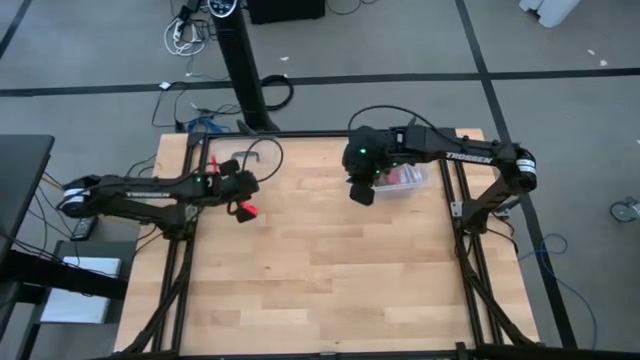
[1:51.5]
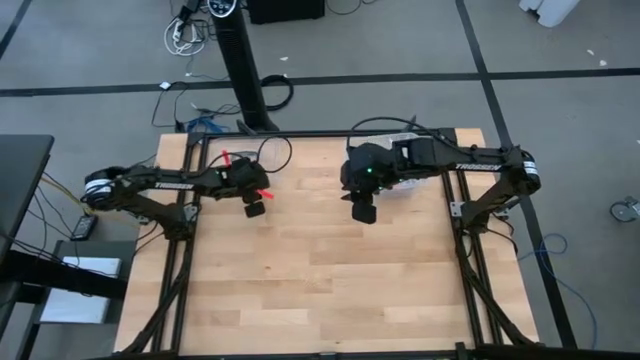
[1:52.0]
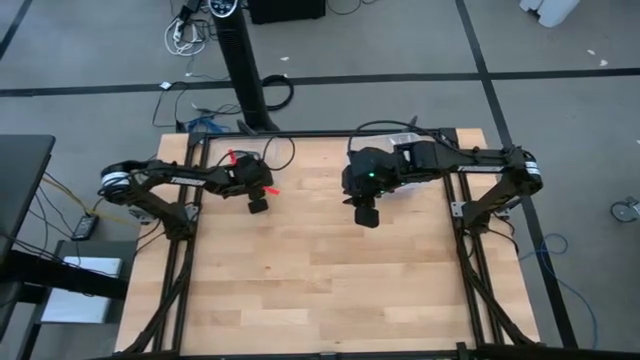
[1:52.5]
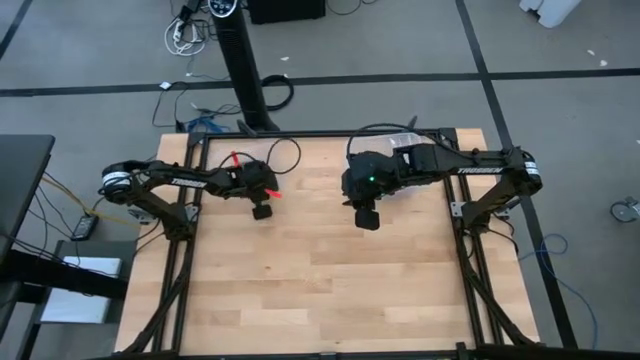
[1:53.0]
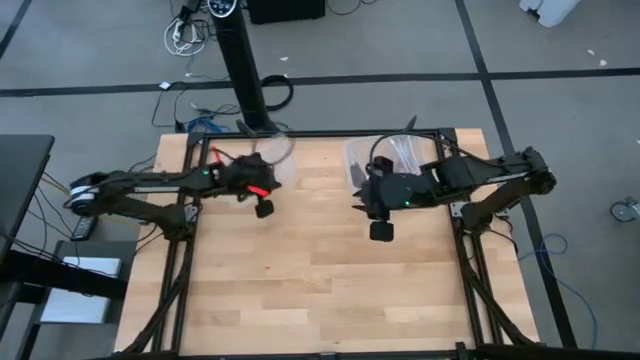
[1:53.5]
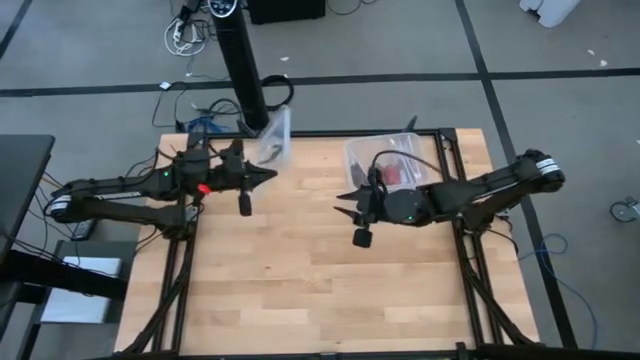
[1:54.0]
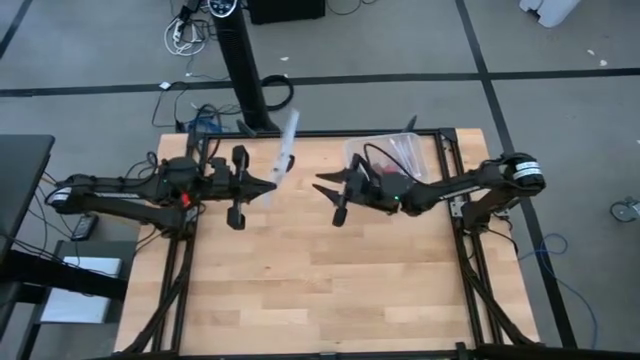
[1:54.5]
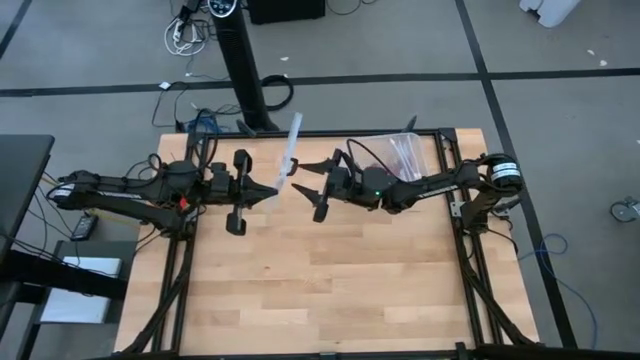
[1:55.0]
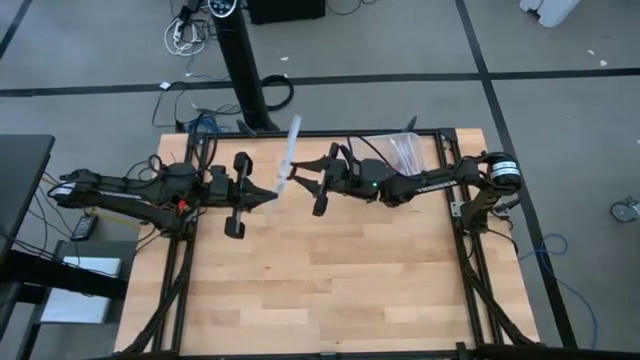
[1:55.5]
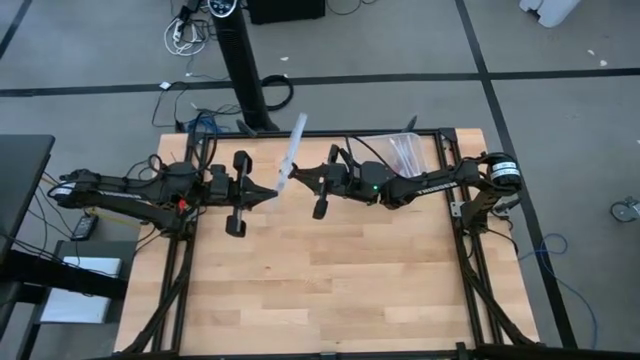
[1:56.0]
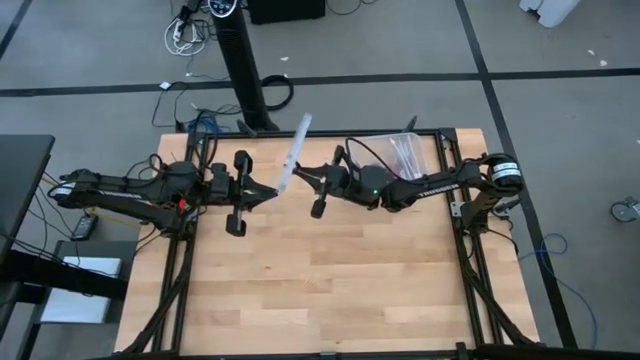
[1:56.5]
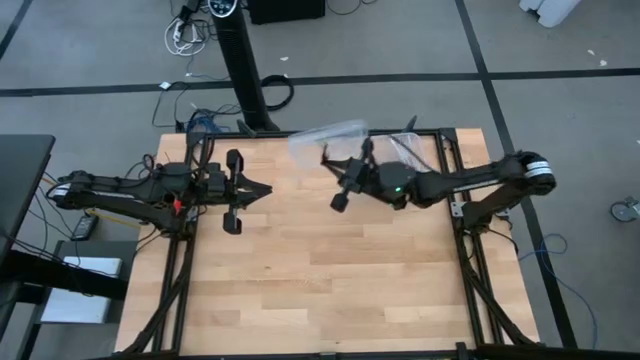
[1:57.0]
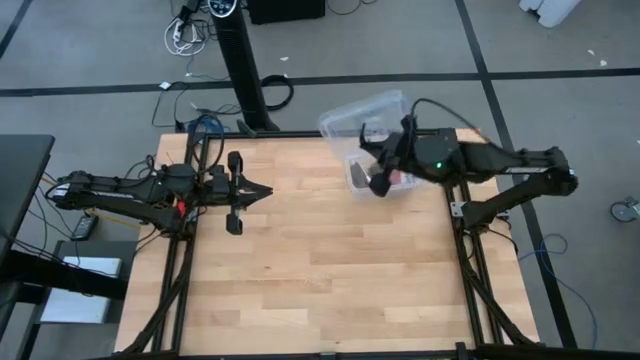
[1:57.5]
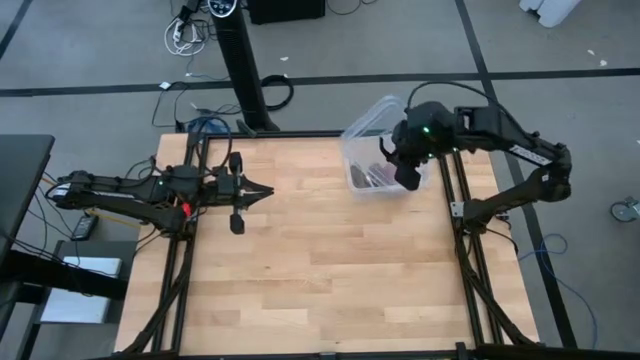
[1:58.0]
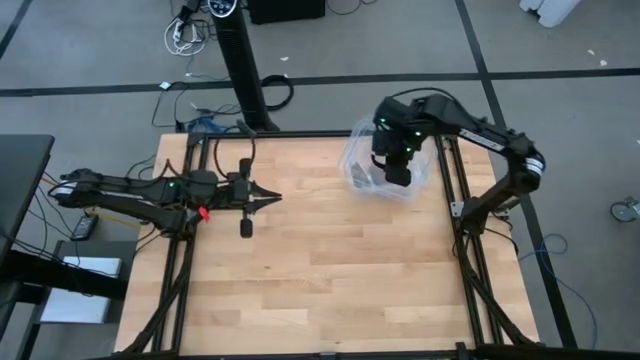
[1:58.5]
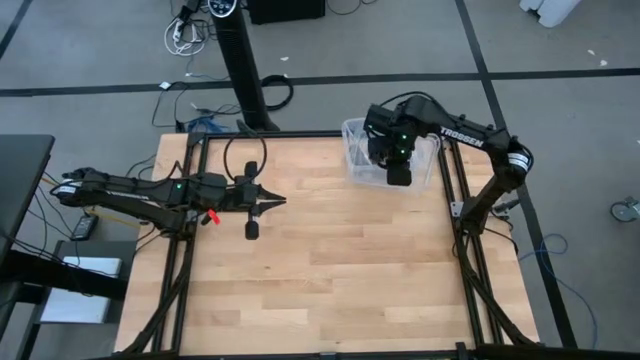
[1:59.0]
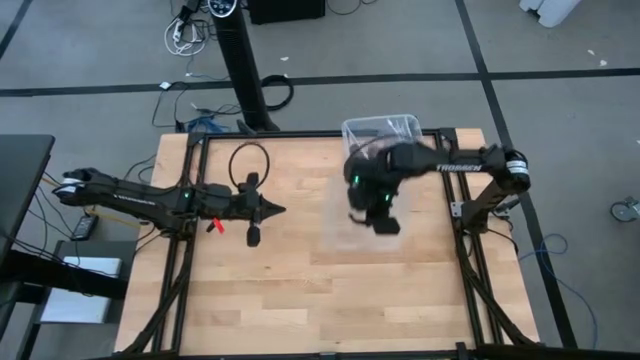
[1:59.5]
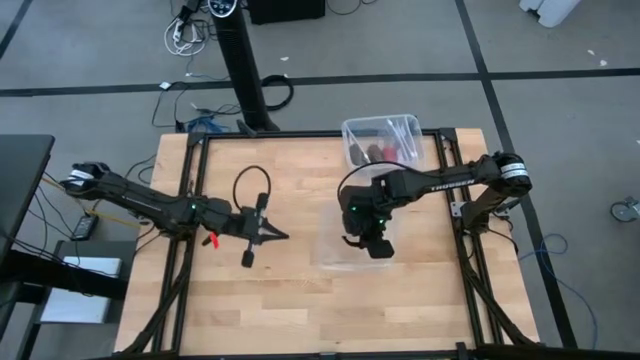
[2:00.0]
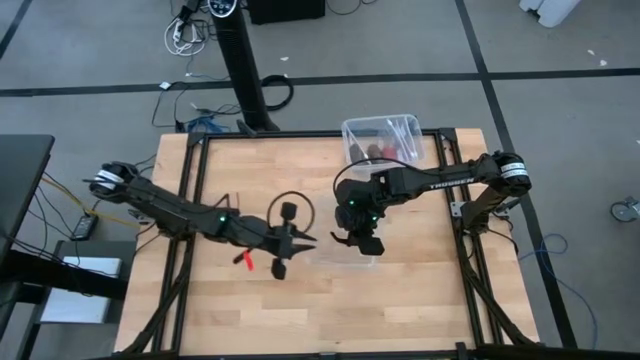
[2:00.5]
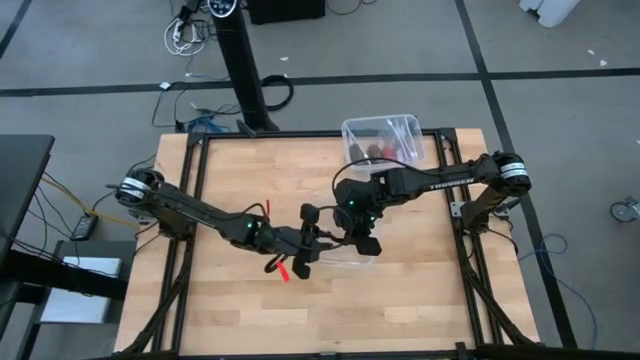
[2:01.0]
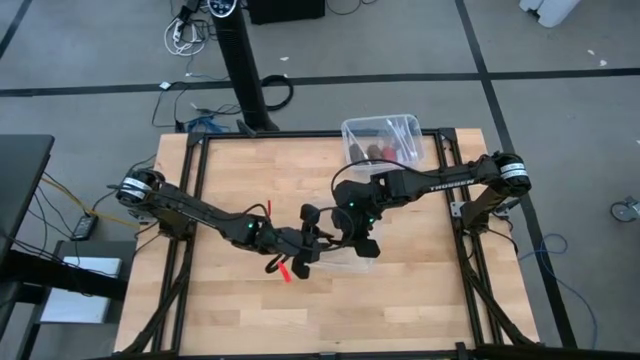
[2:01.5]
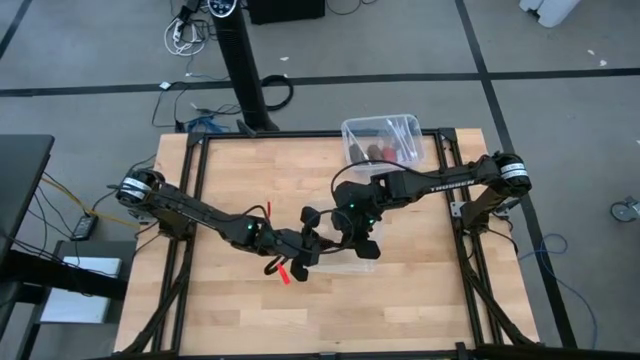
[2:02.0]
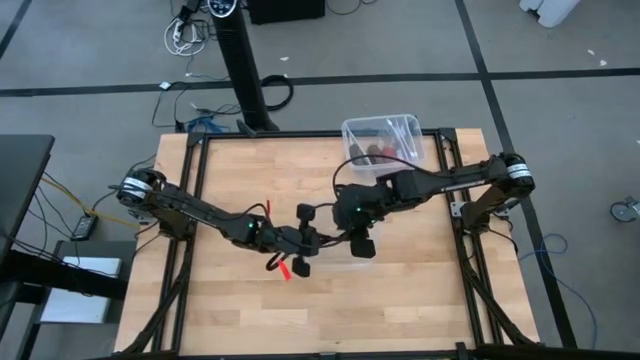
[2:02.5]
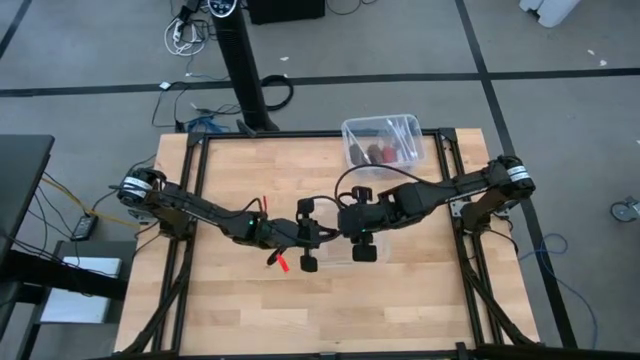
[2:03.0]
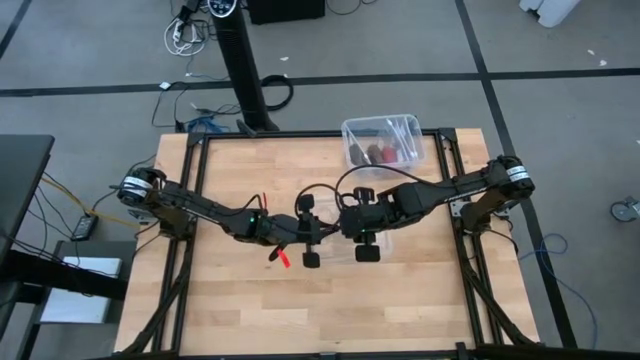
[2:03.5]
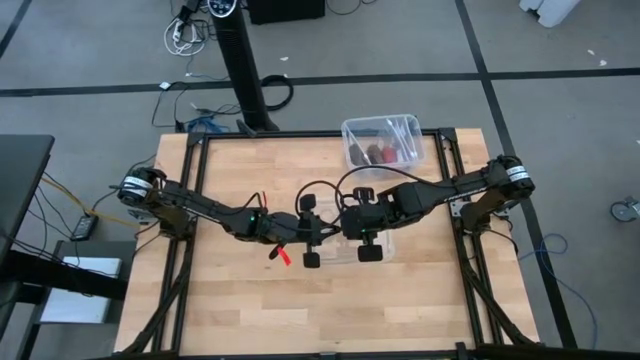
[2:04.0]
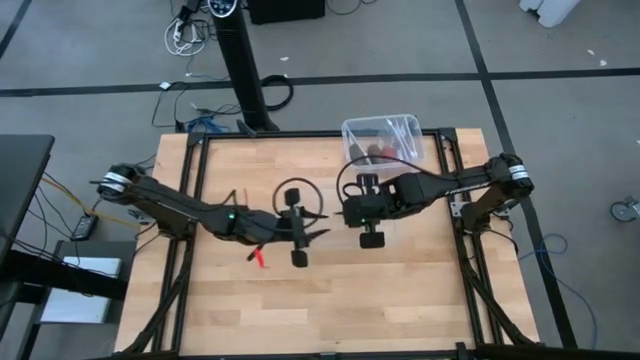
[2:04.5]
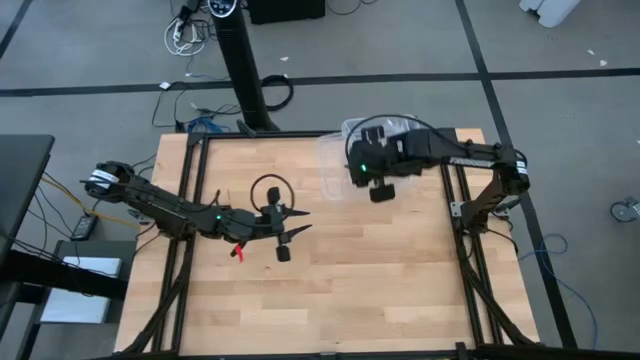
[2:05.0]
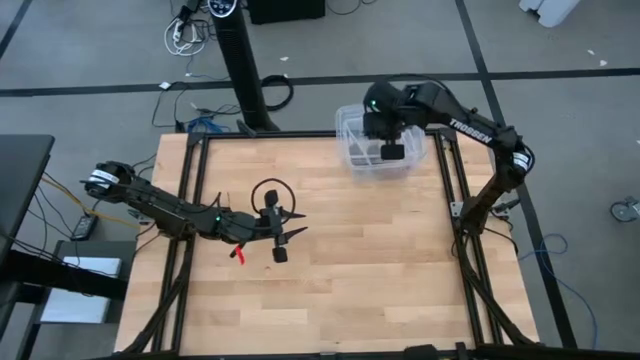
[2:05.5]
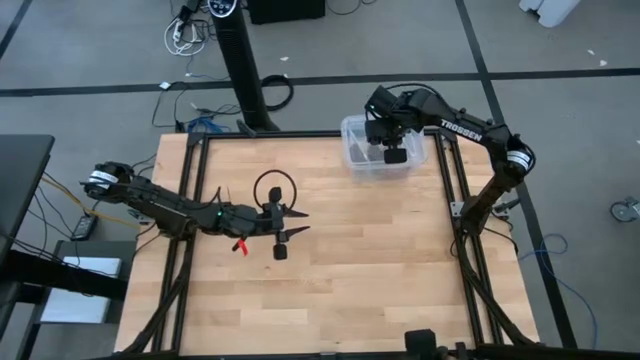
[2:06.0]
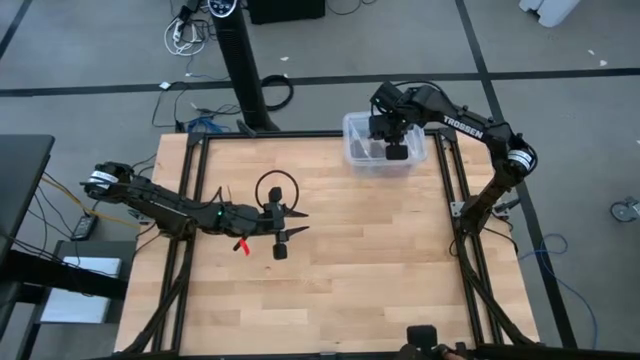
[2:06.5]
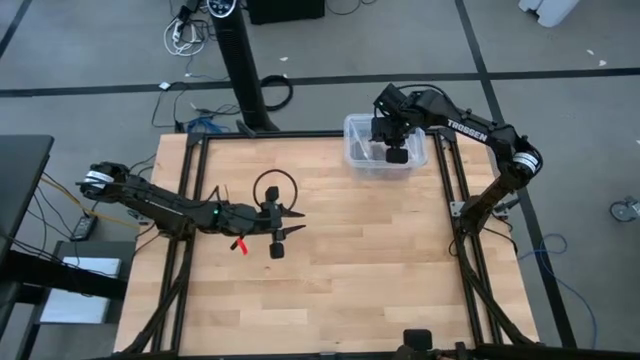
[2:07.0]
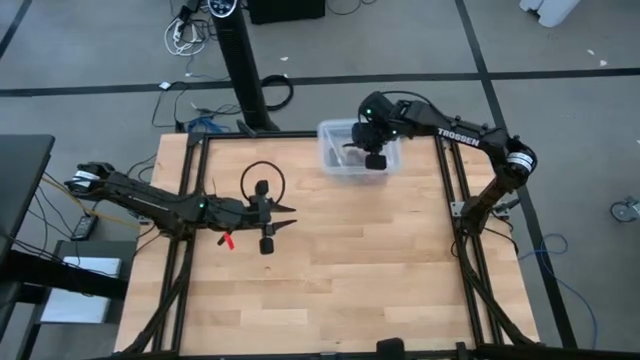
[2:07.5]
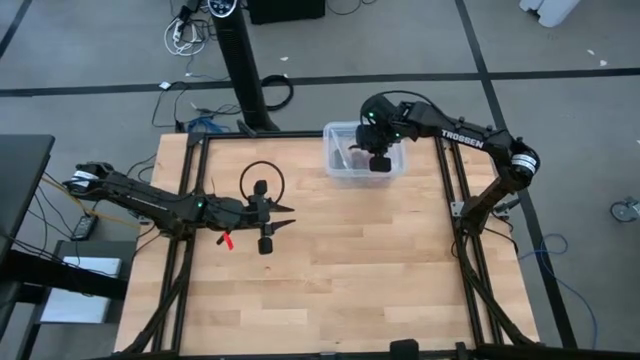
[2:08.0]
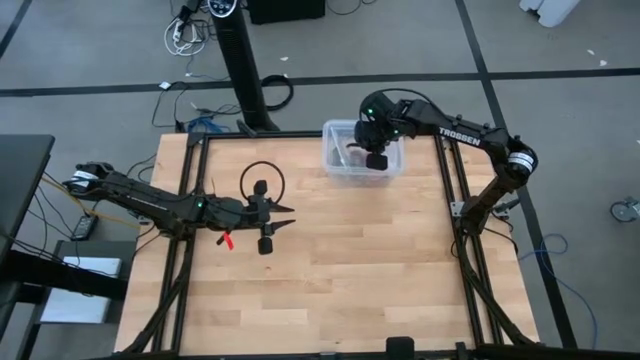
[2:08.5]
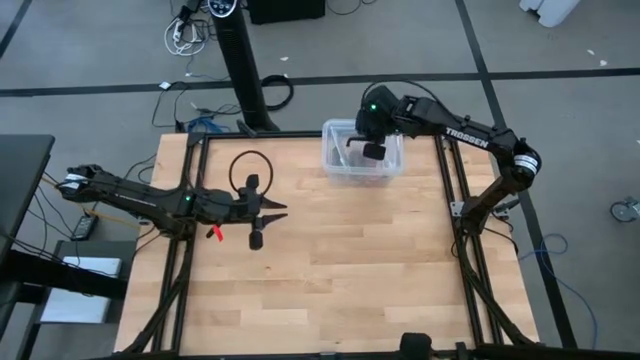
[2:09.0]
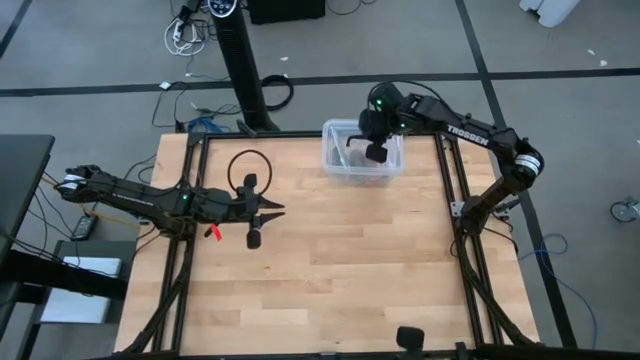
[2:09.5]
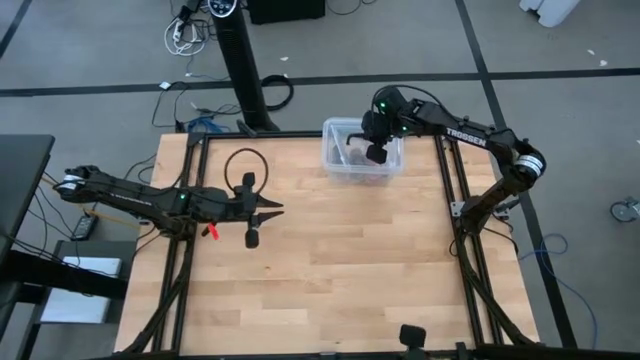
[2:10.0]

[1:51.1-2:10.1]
Task: Roll bandage
Close the transparent bin

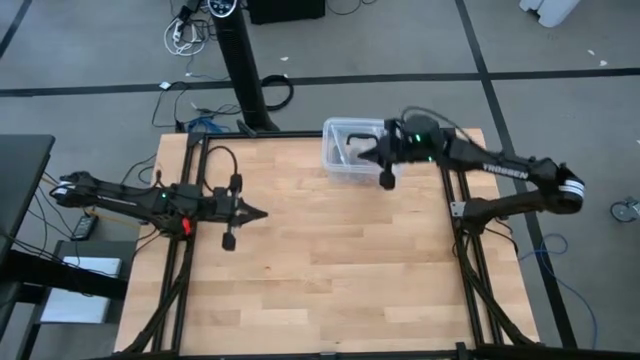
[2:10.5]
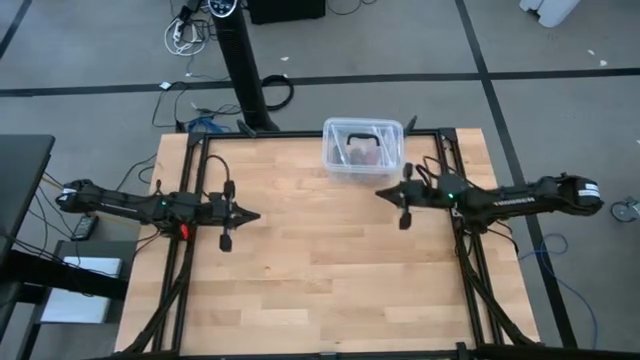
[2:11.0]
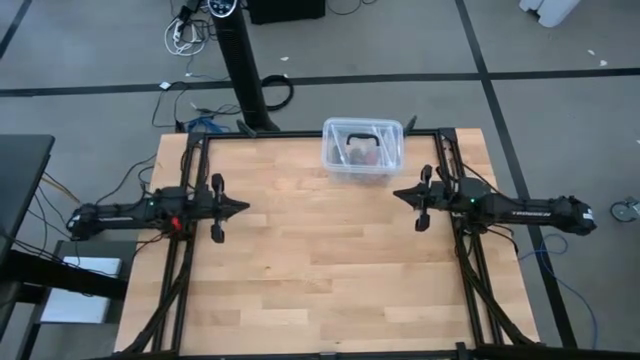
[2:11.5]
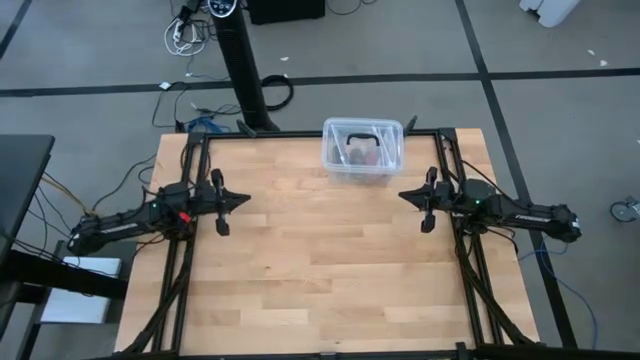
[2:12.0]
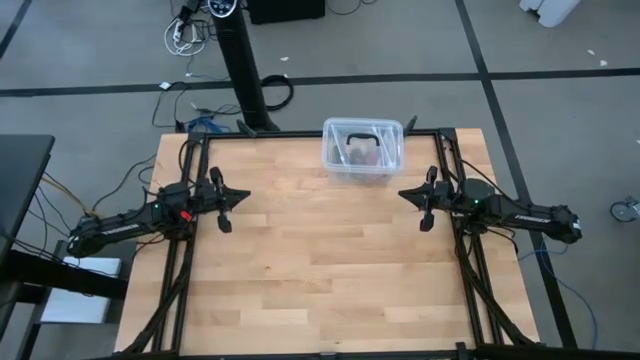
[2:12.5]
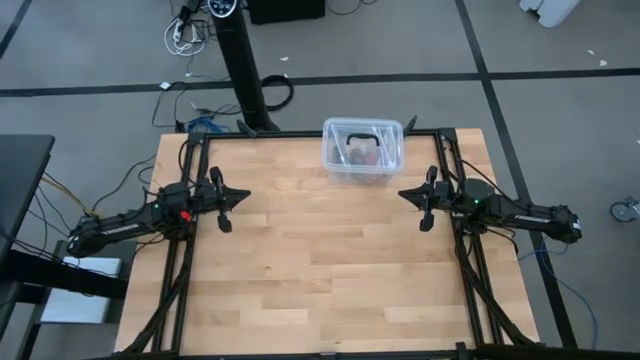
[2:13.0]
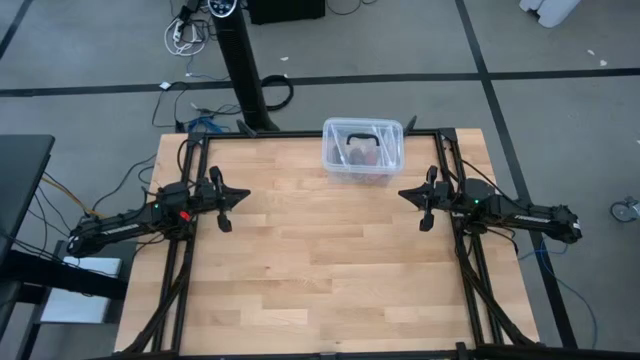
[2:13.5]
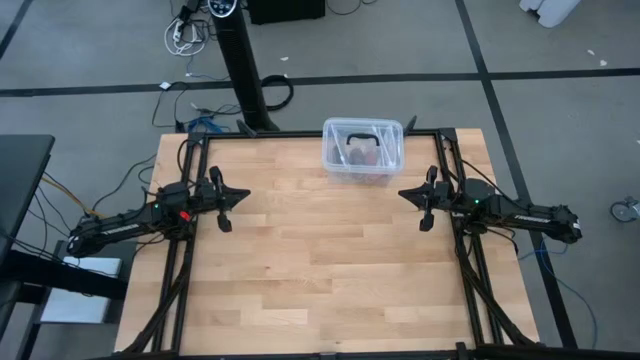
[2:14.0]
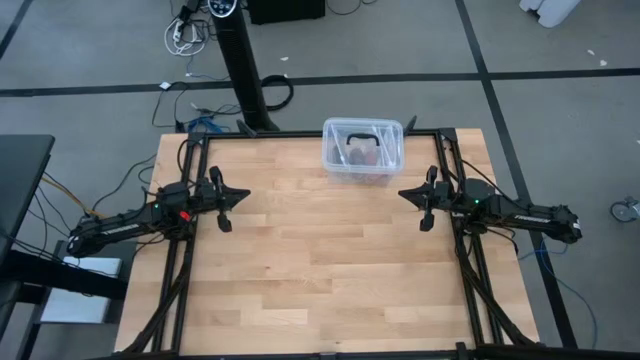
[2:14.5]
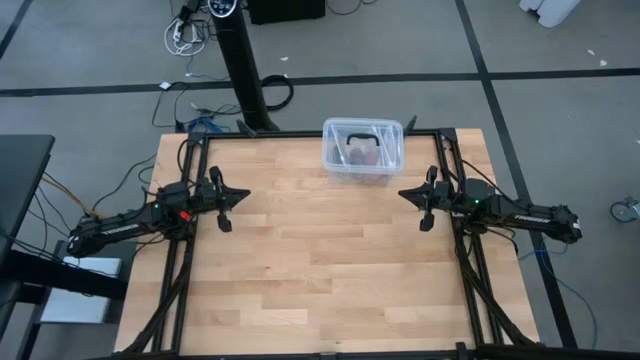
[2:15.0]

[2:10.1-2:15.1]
Return to Home Position
